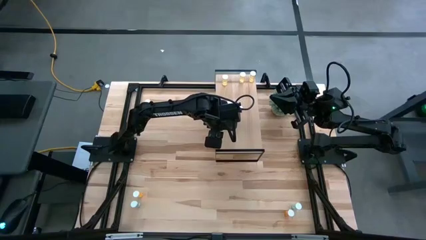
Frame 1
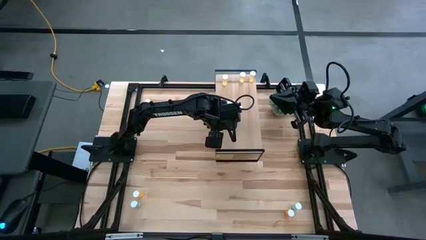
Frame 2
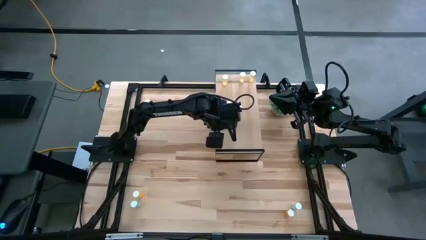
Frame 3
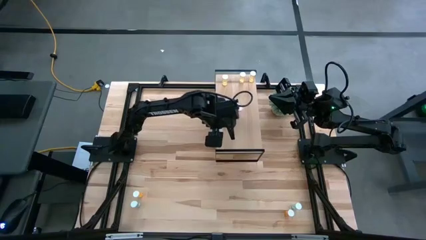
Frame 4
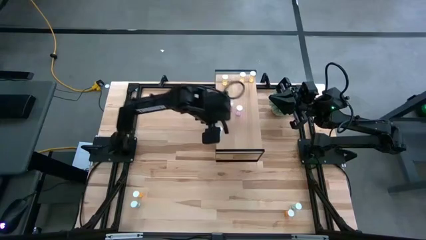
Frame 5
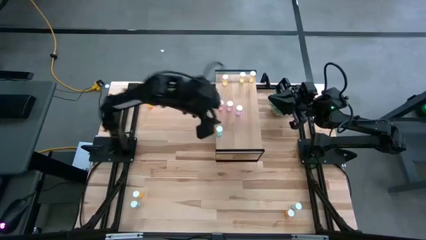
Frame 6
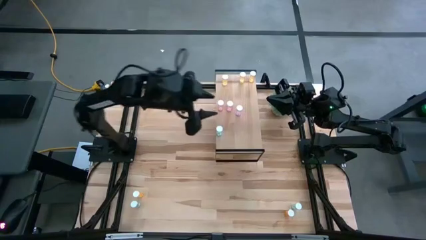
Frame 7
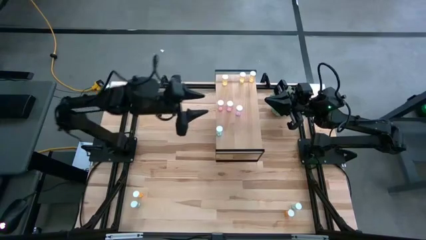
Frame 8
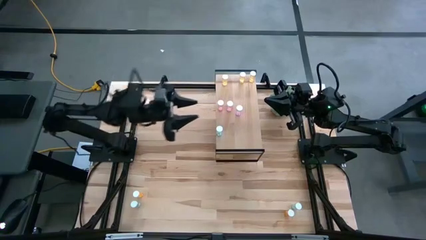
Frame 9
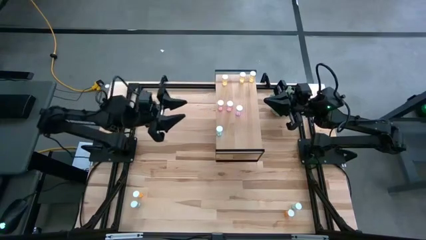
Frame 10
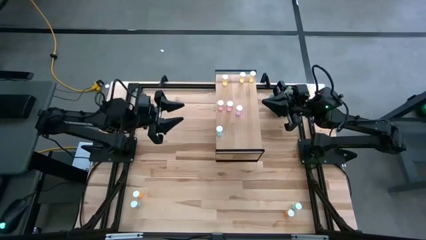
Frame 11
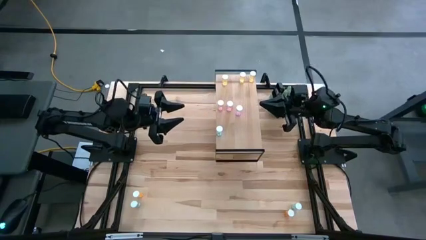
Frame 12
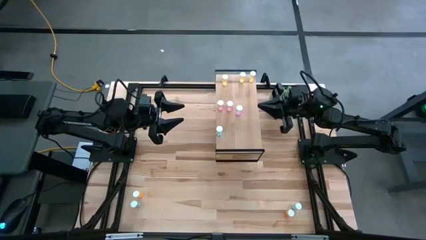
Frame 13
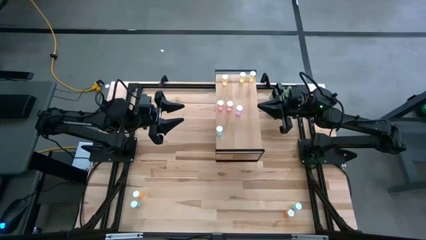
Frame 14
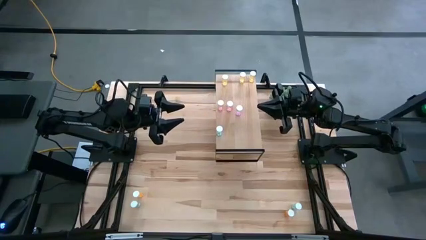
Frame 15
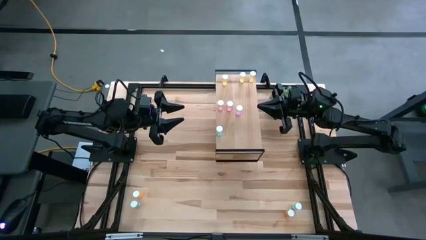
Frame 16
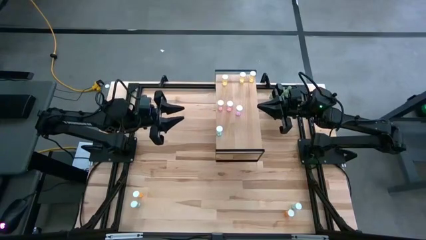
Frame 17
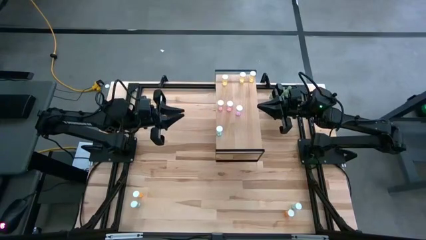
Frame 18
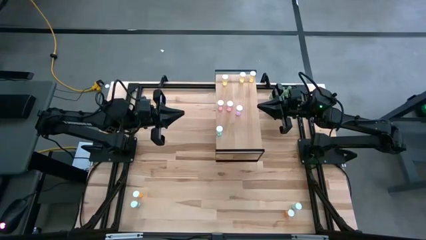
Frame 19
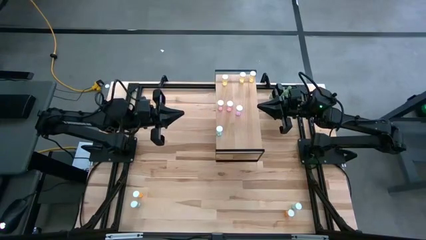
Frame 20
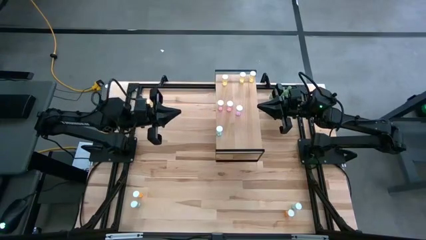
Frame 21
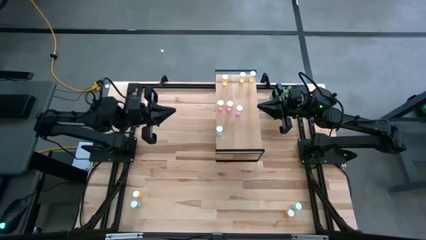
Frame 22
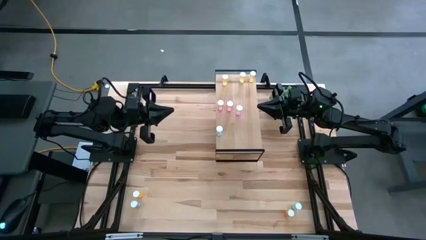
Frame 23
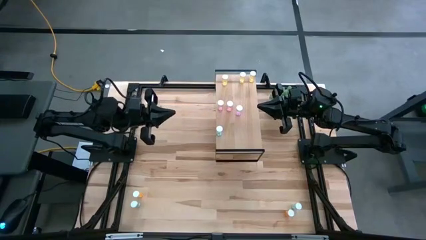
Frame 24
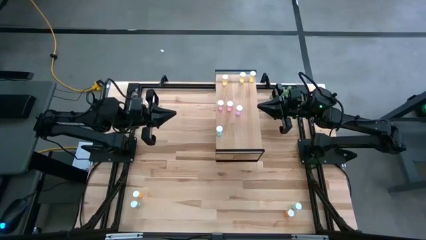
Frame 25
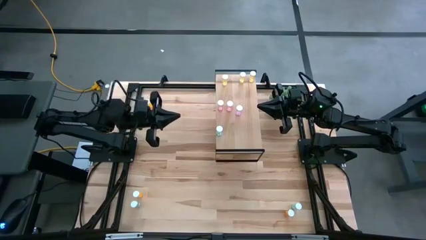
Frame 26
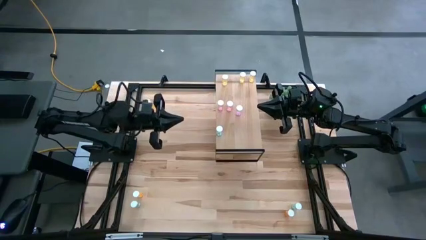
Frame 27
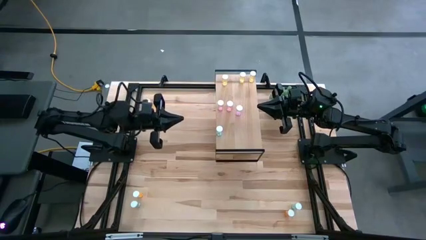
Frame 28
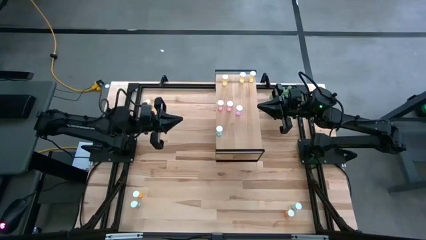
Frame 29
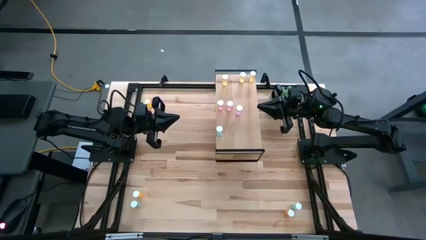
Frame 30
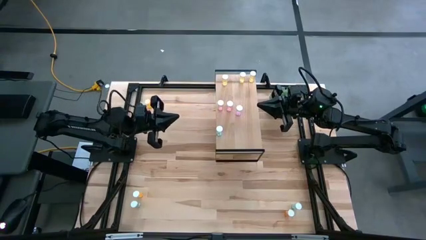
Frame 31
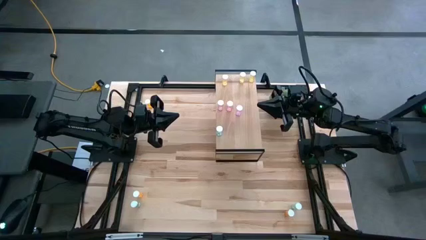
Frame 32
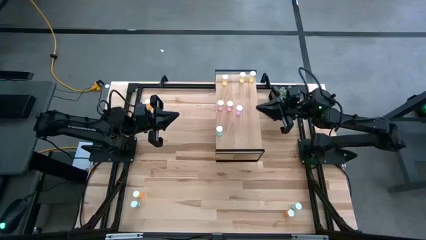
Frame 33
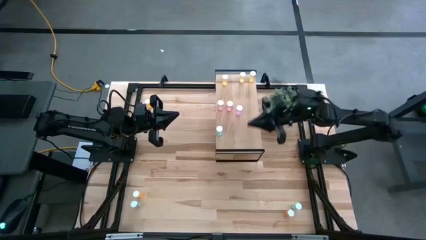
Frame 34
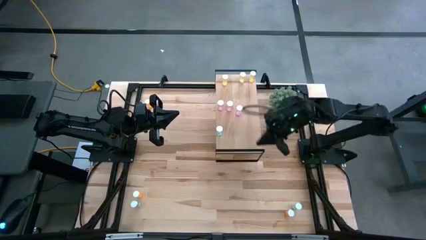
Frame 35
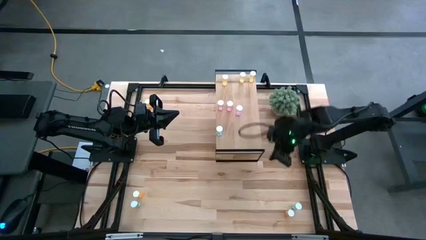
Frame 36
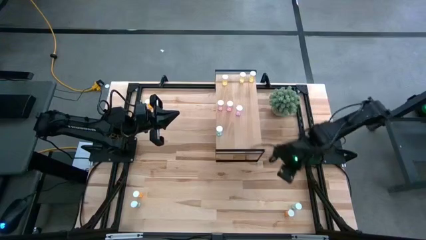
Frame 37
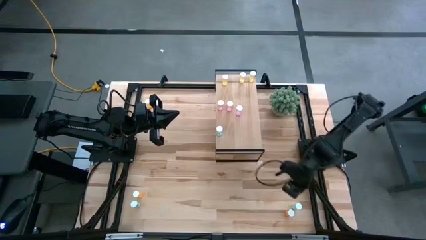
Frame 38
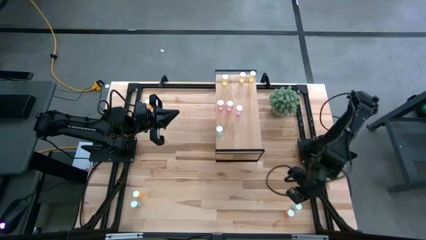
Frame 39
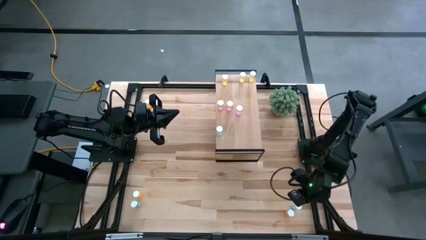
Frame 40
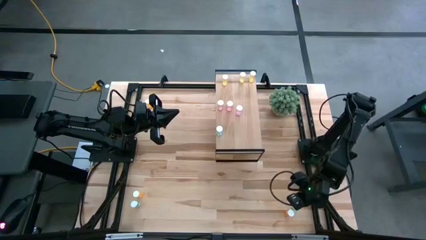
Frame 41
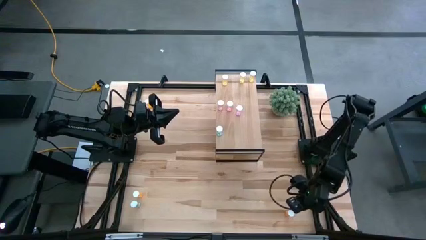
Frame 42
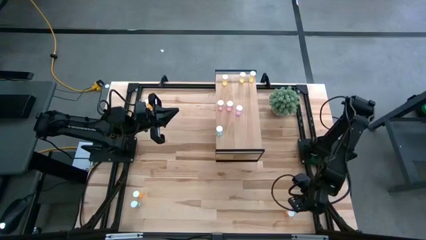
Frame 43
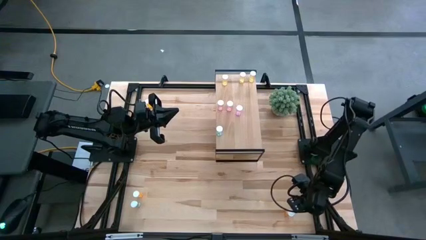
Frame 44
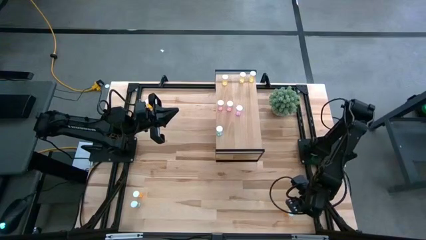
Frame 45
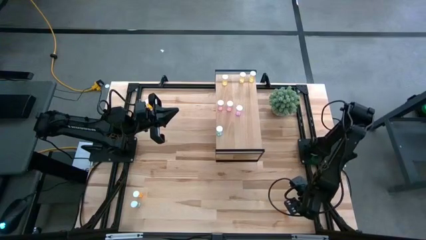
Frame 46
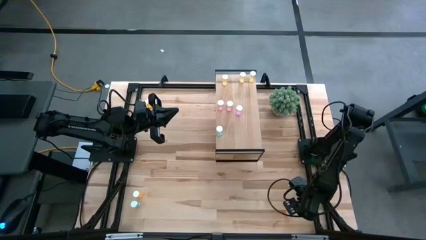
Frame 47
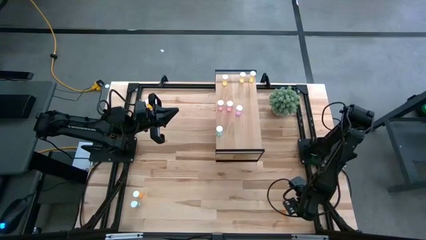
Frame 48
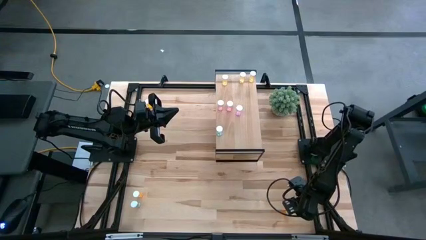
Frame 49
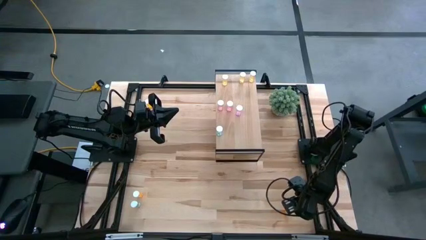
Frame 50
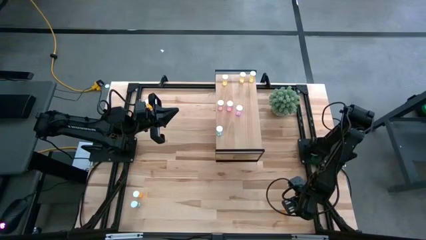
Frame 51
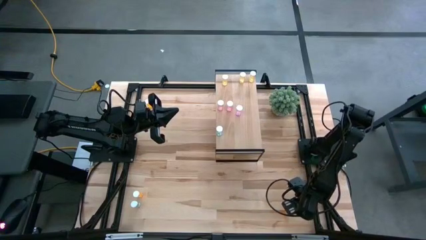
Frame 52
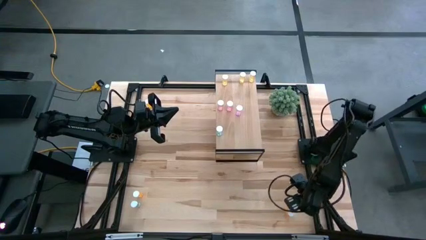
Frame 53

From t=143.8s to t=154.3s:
Task: Pick and place medicine bottles onto shelf by color
Put the right blue pill bottle on the shelf aligned with the other blue pill bottle

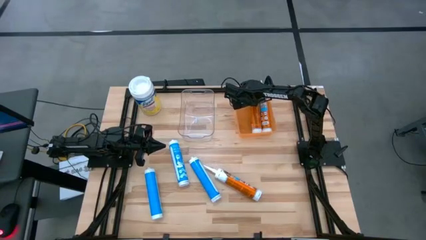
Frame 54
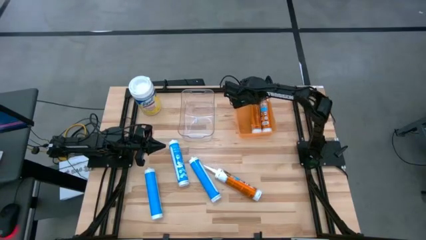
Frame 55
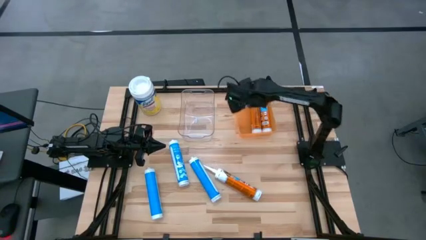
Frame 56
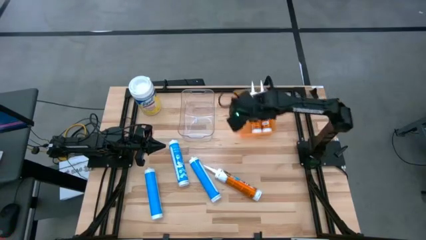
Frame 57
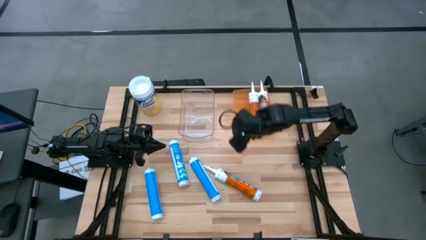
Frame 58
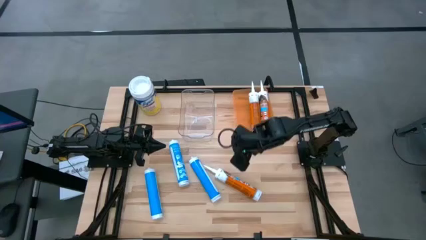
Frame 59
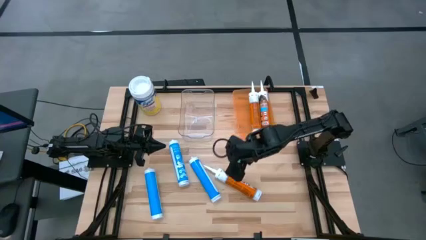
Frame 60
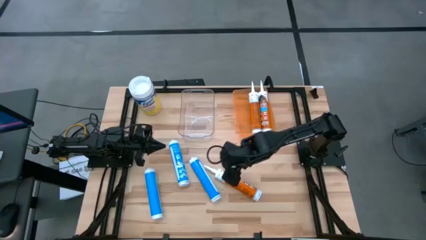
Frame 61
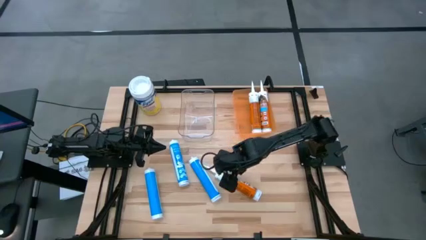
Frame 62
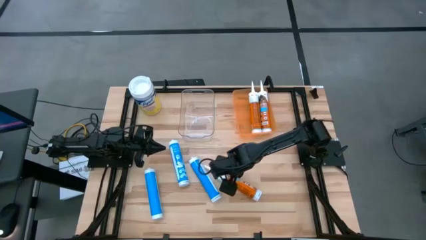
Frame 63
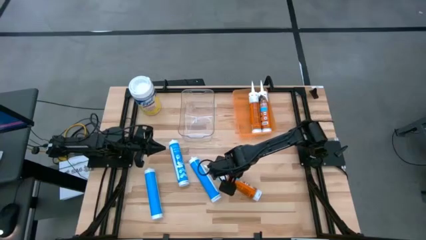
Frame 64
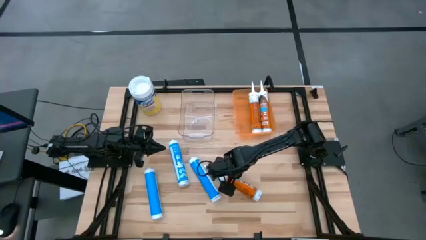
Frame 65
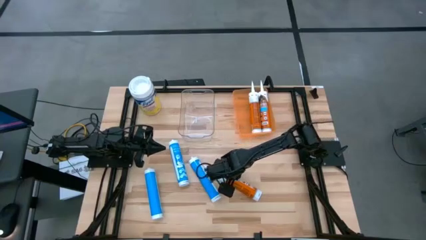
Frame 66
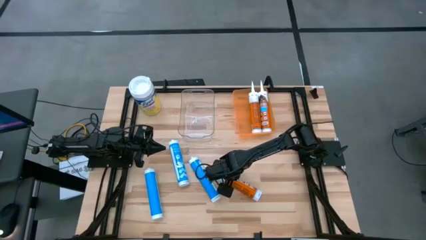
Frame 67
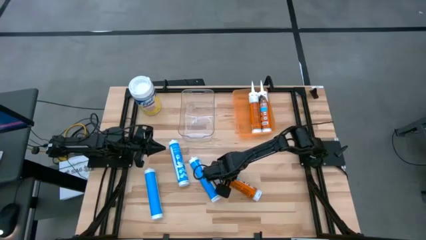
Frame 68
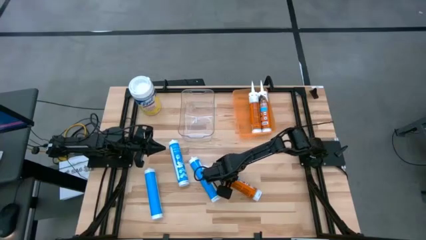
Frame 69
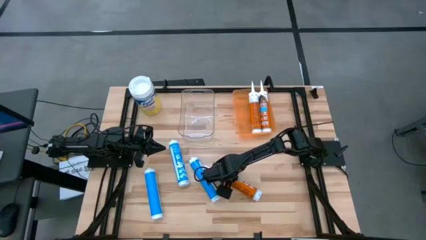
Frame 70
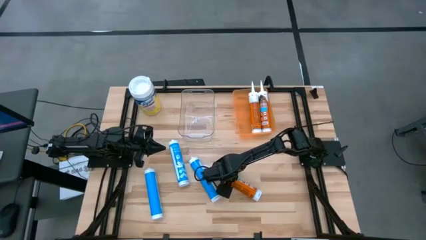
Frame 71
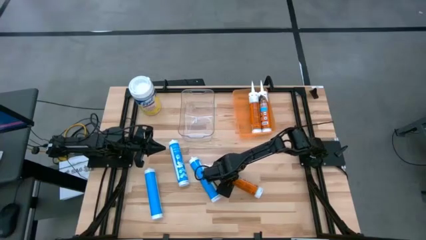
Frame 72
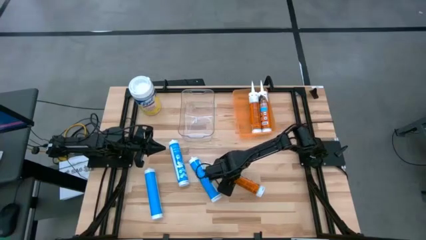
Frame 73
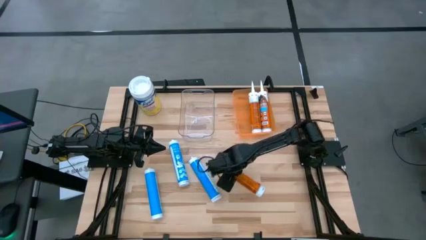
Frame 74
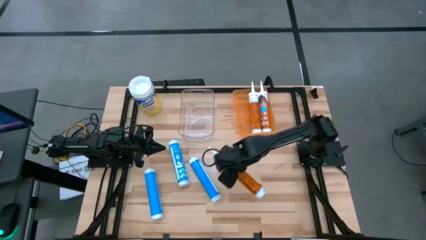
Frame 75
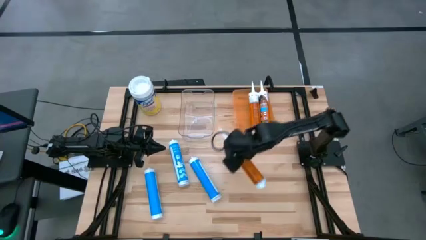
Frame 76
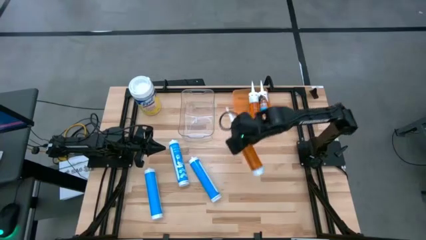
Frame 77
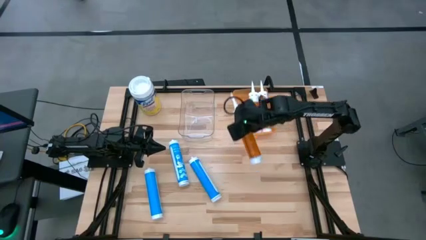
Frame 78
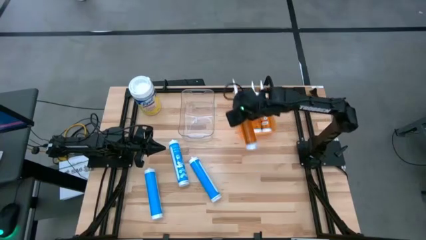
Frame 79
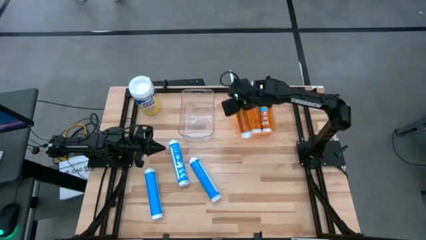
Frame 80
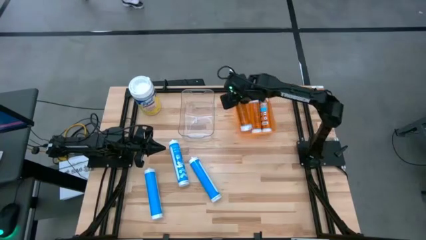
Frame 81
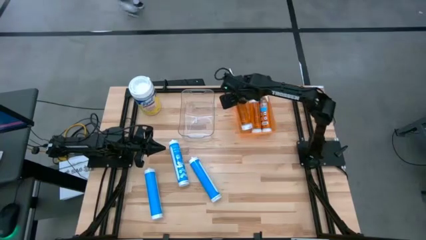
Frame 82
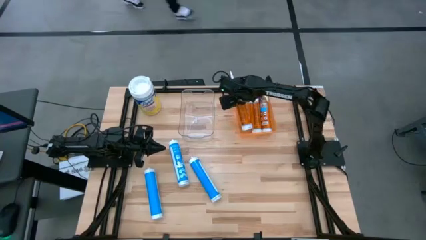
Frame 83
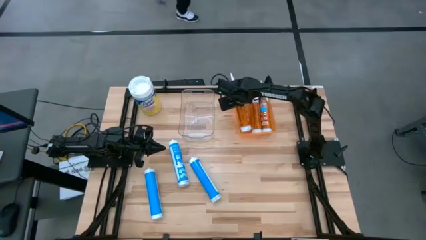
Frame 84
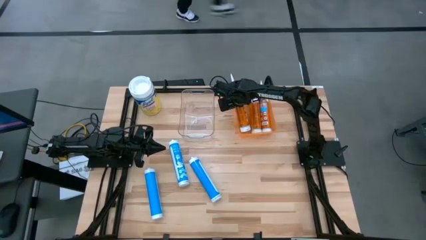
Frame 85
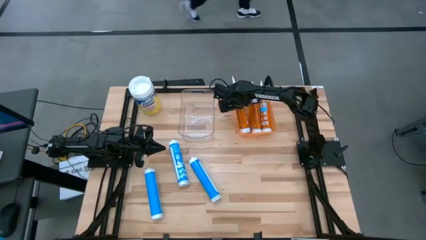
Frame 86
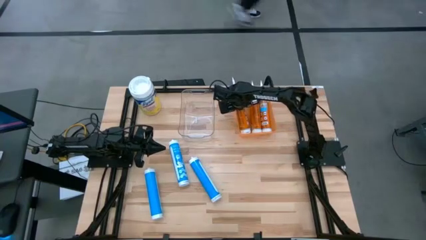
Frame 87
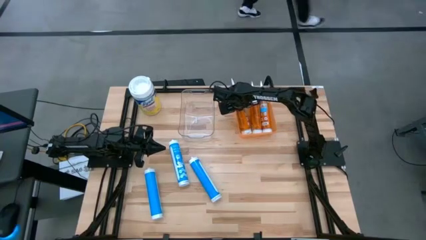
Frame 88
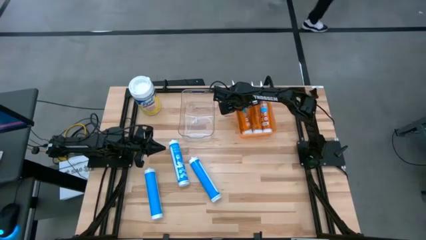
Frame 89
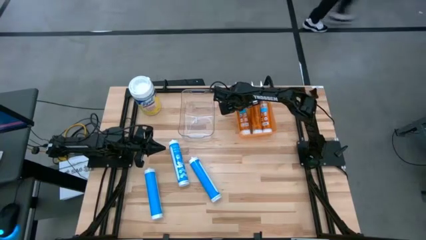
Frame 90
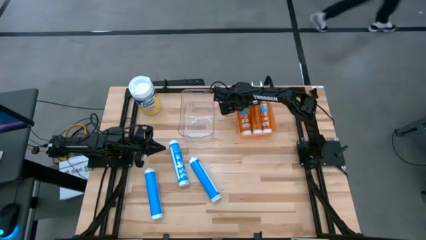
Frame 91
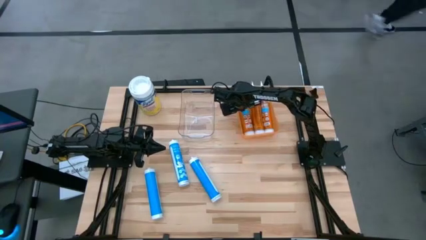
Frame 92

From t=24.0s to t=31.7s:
Task: Pick & place silicon tubes, Sealant and Lysol wipes
Put the orange sealant into the orange bin
